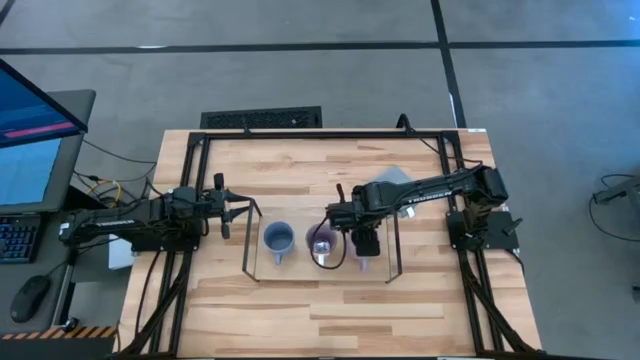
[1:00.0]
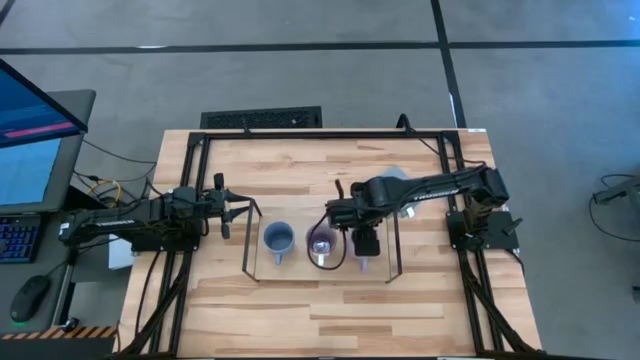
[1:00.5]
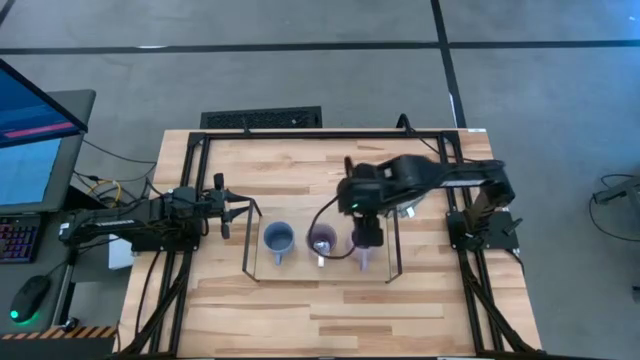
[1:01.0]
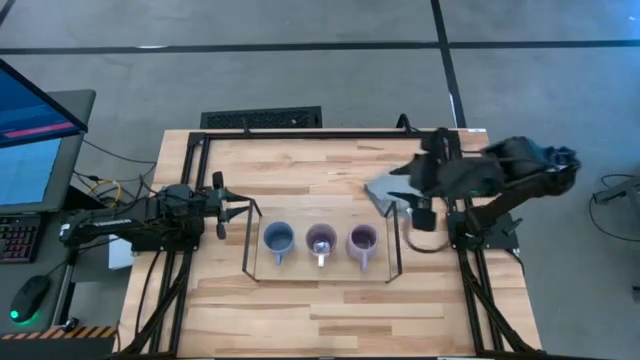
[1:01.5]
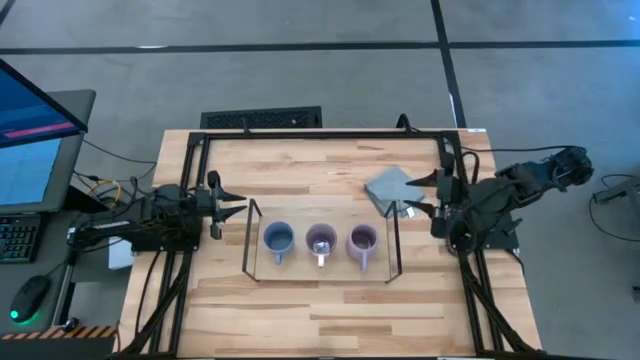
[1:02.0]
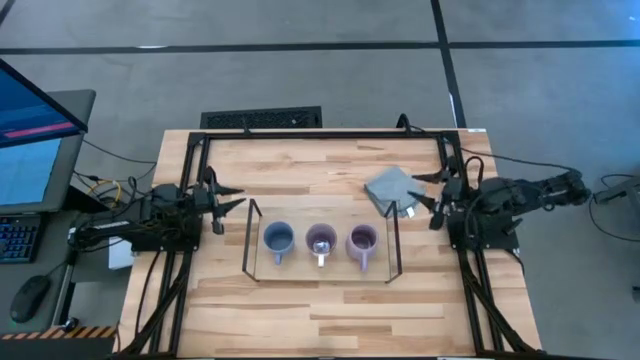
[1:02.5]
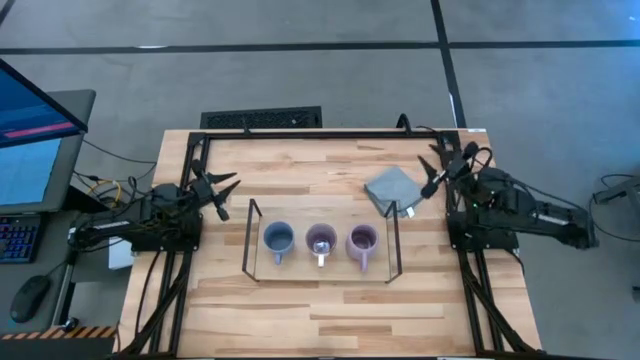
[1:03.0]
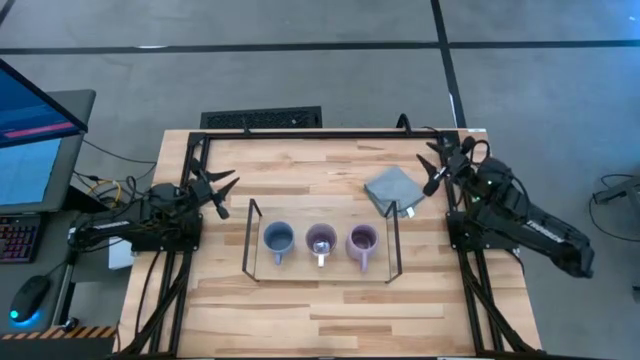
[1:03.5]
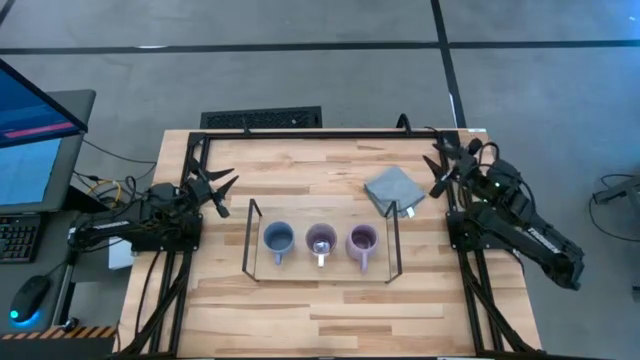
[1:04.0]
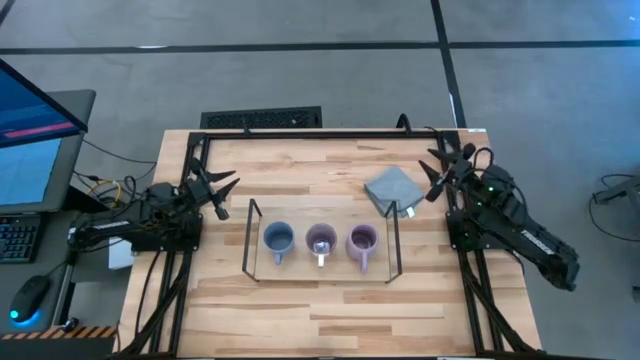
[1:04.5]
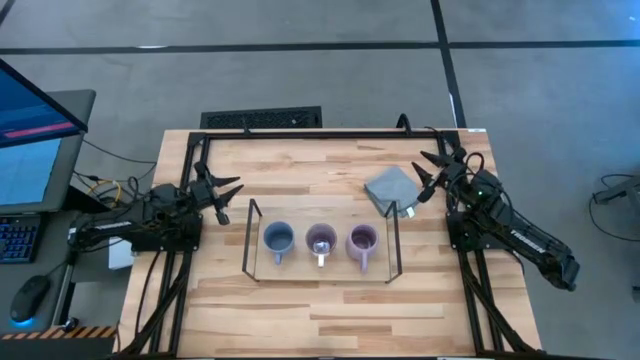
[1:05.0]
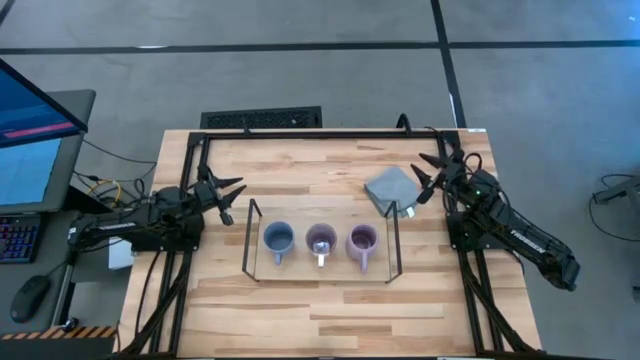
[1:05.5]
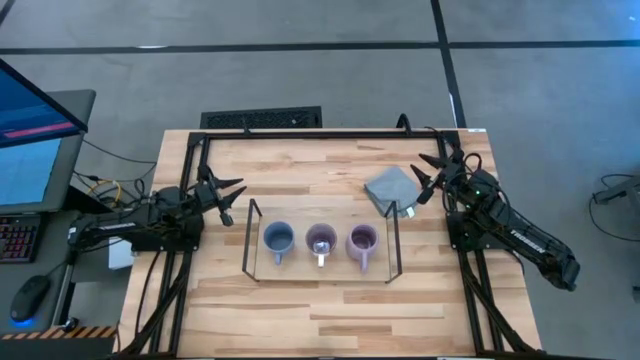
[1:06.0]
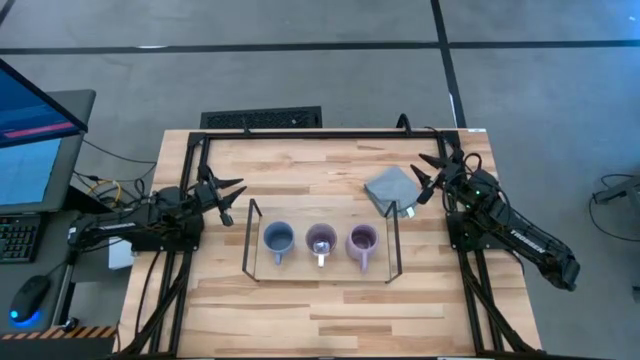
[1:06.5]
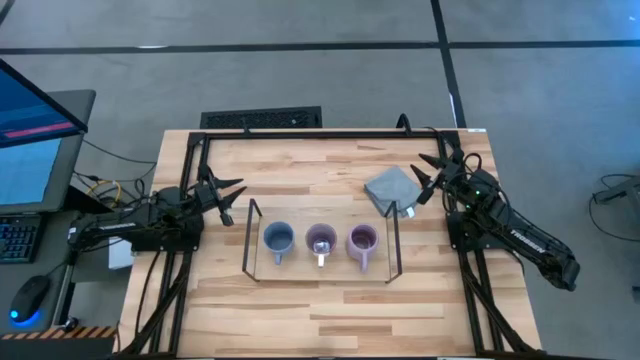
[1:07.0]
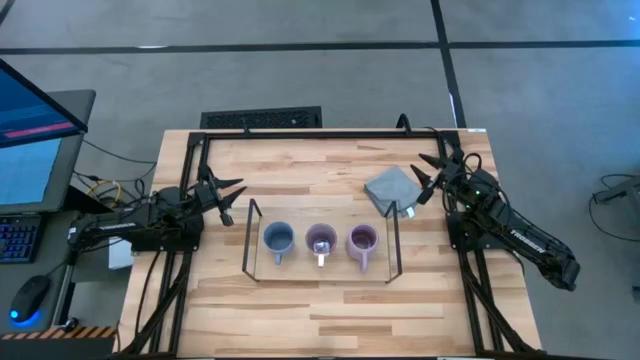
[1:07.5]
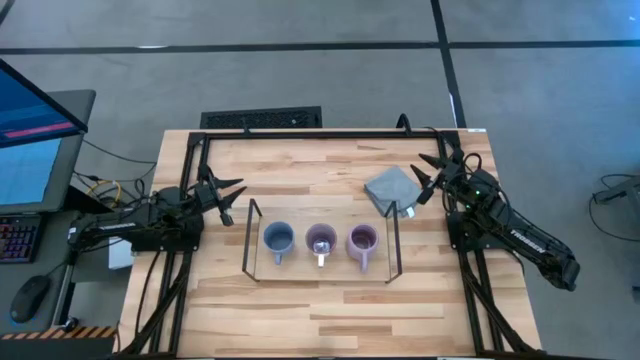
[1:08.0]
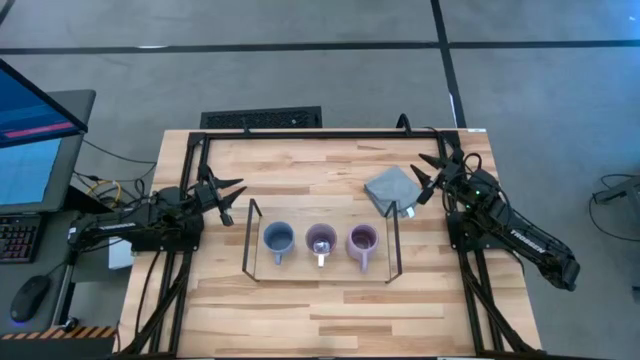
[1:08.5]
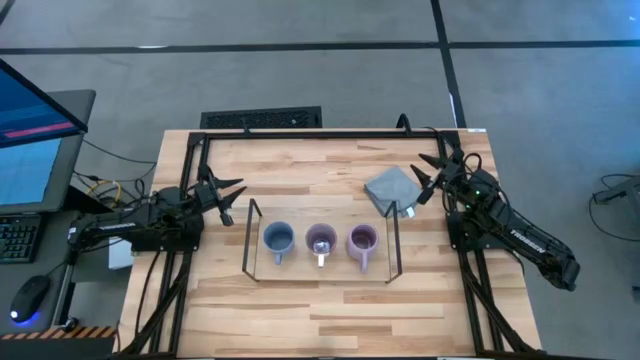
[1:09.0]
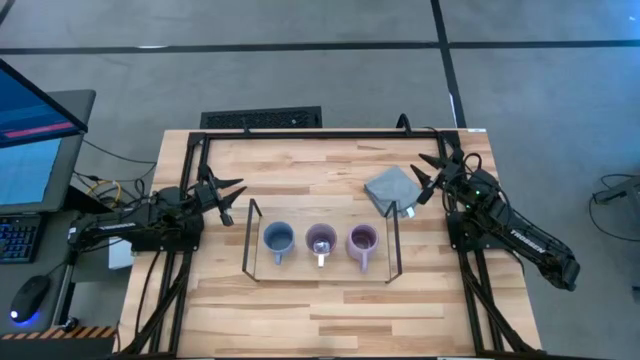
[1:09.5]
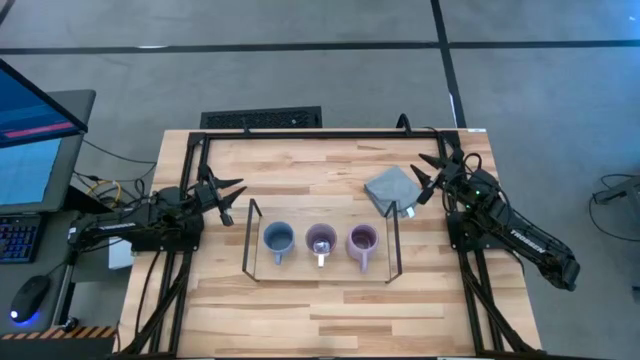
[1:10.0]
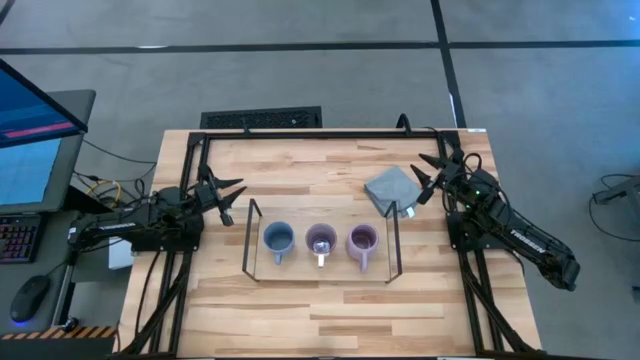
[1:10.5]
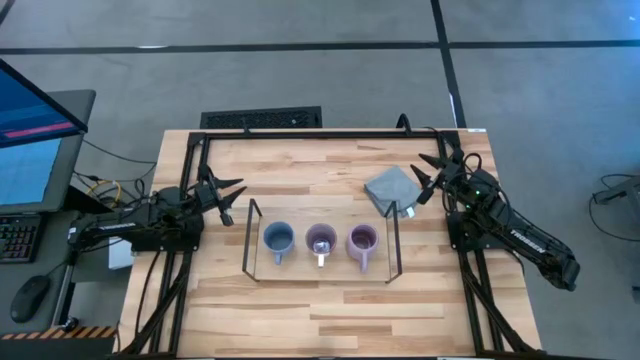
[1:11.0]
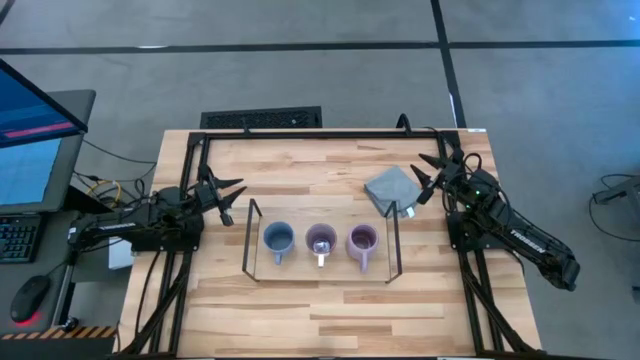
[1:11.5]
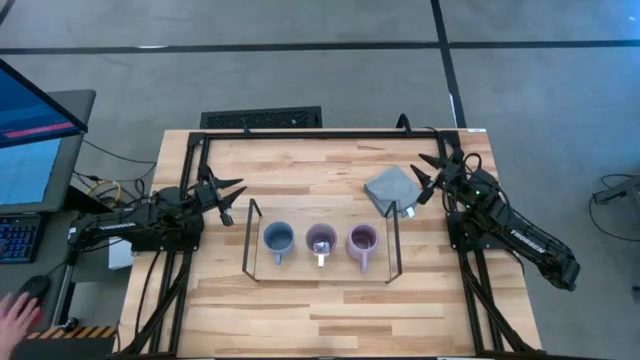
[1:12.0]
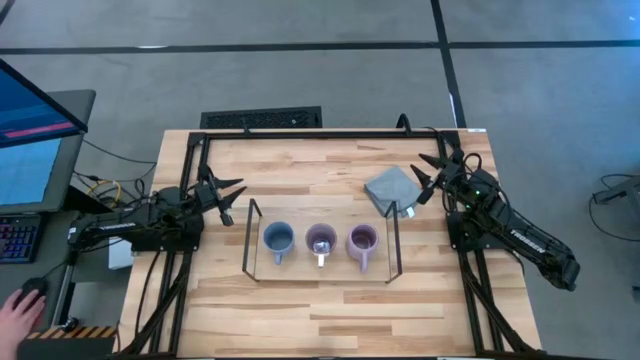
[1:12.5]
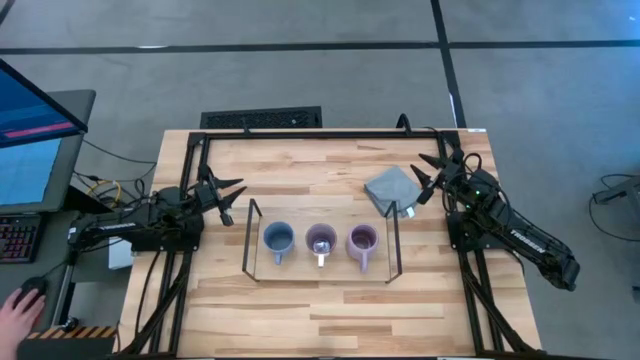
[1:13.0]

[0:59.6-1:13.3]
Task: Stack small to large cups/mugs on shelf
Return to Home Position

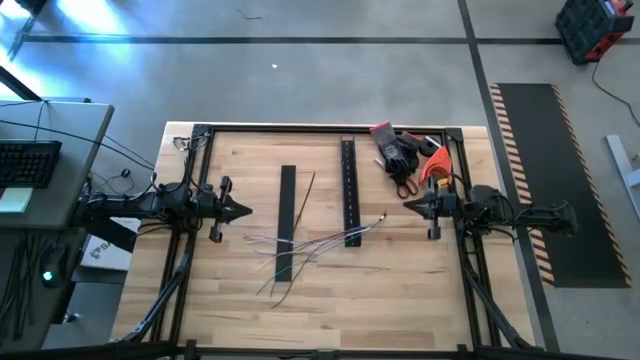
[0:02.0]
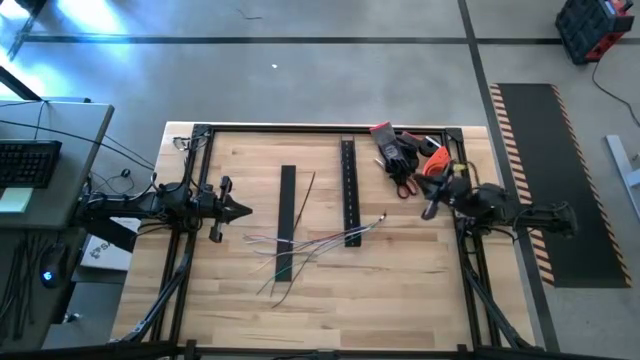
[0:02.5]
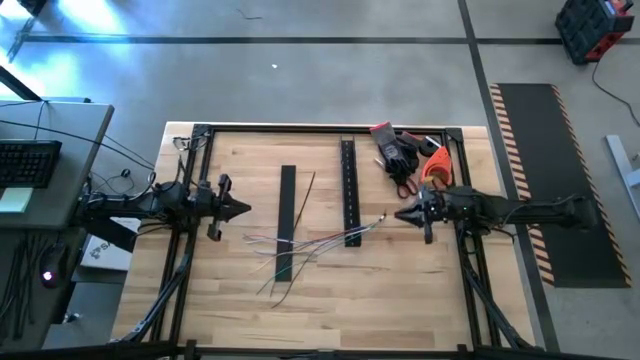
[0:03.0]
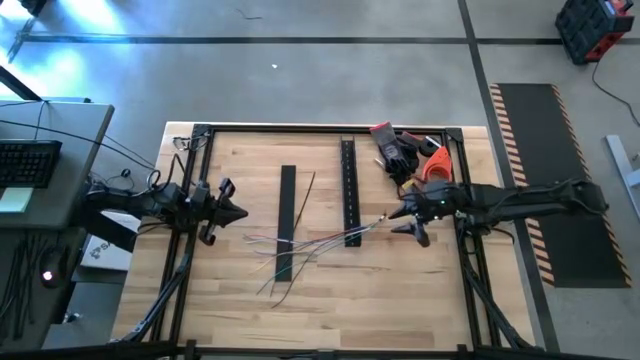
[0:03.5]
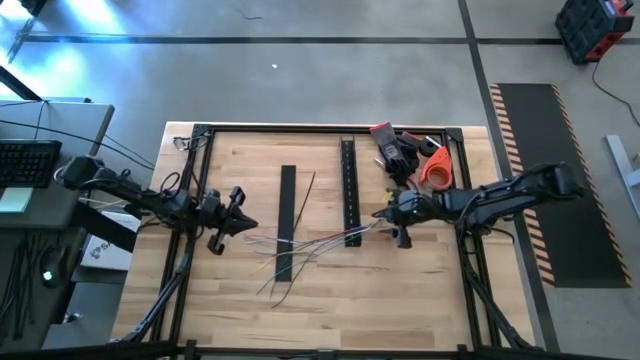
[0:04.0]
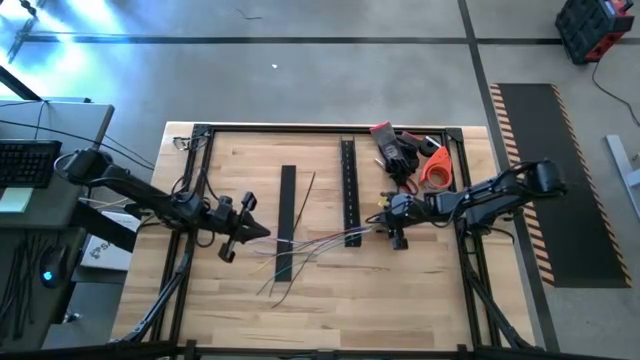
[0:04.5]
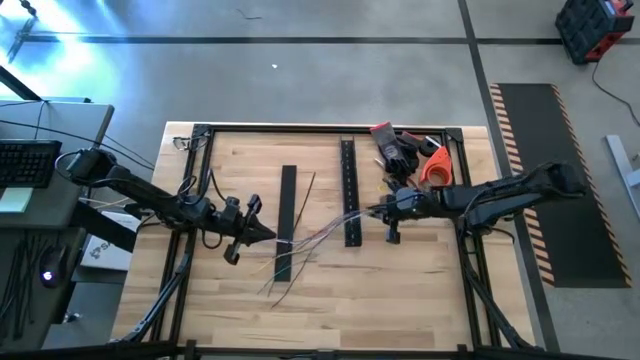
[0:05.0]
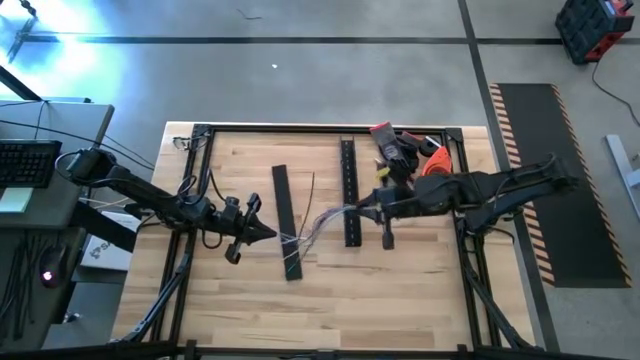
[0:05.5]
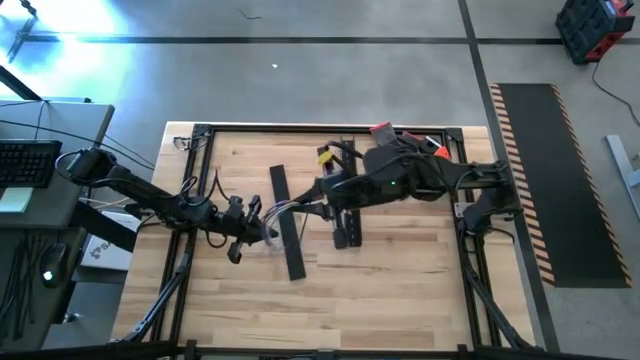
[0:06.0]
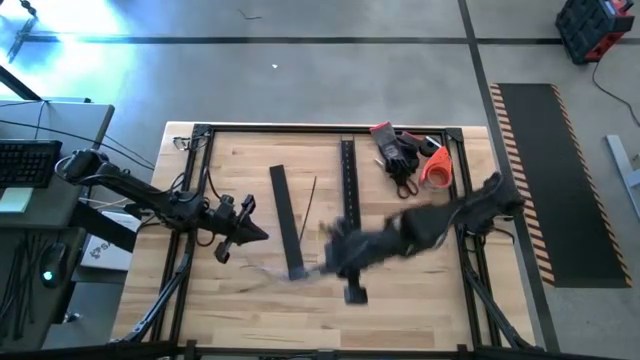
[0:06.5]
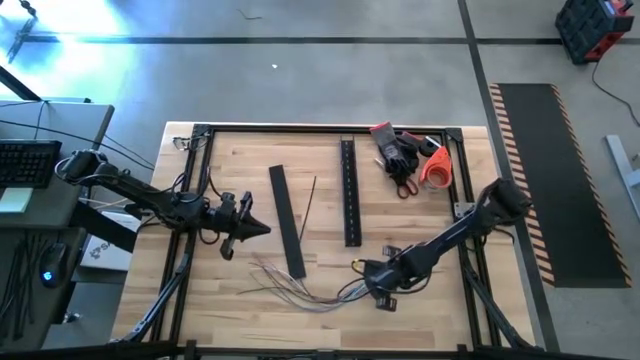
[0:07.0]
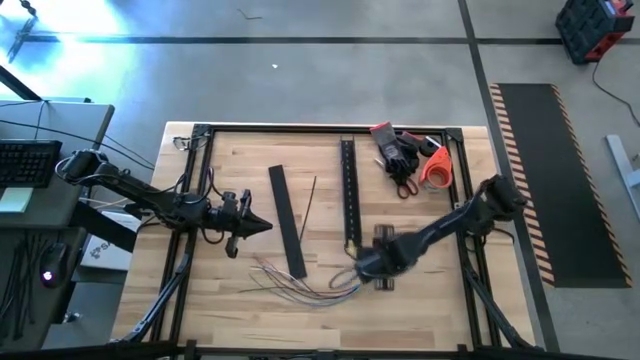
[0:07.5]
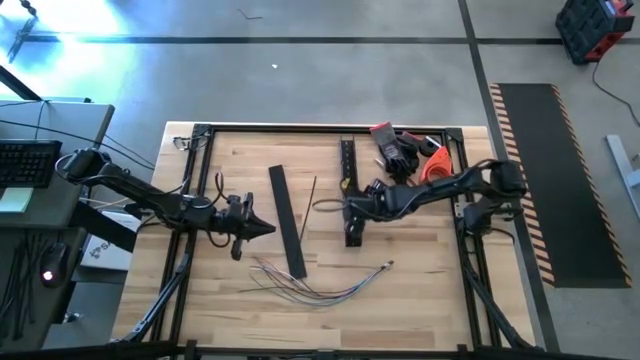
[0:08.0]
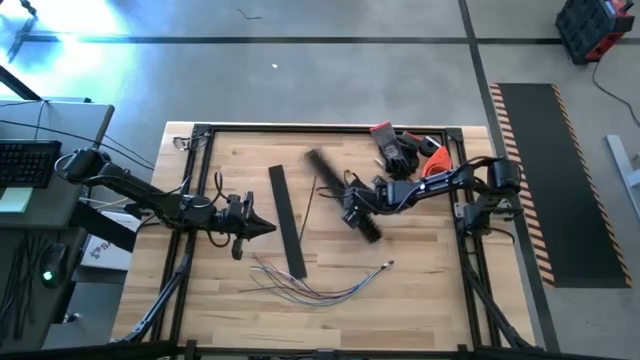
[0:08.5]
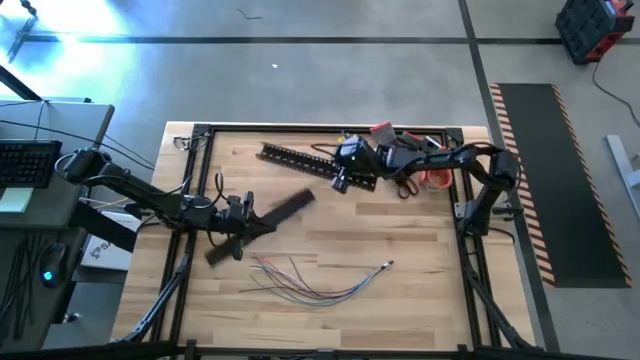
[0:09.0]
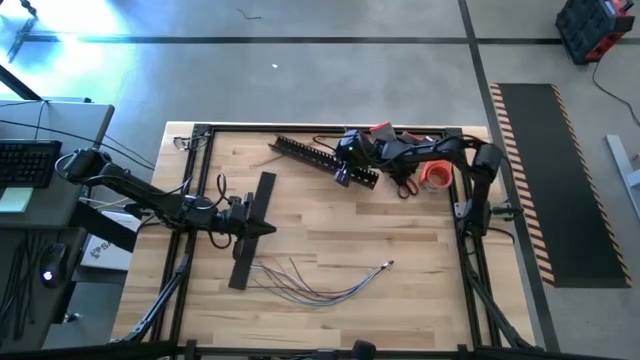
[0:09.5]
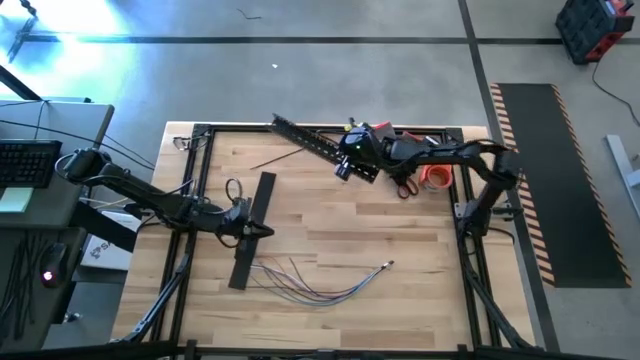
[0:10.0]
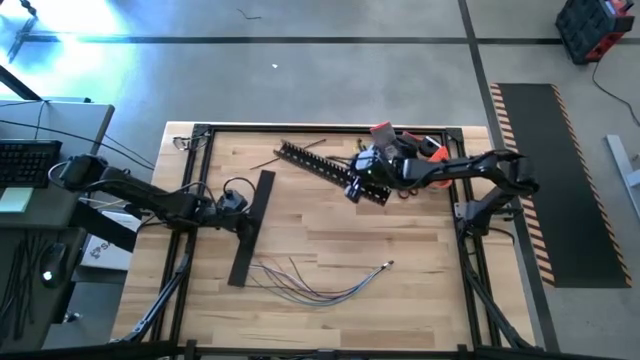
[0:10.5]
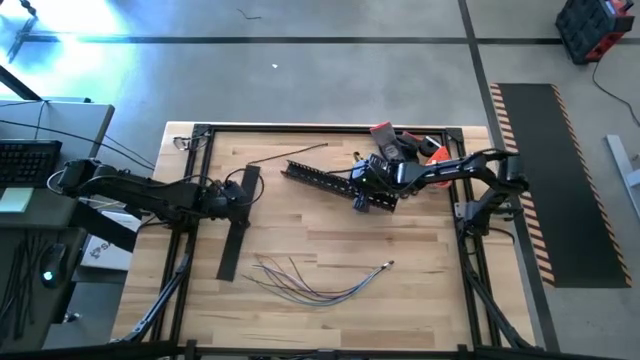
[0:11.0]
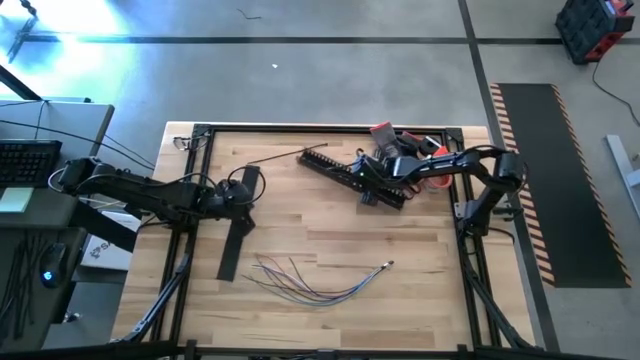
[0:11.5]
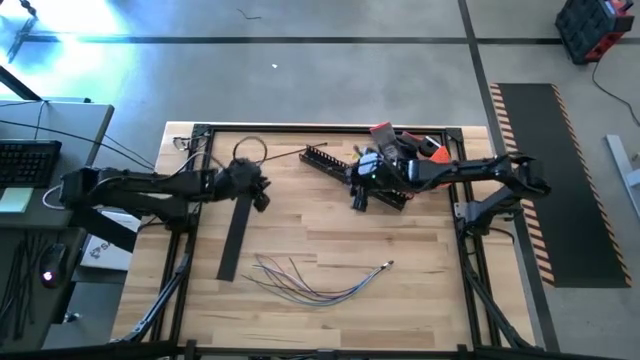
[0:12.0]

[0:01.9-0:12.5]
Task: Ziptie cables
Wrap the black zip tie on the cables
